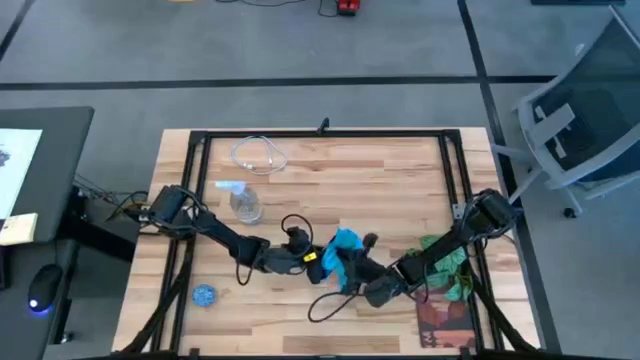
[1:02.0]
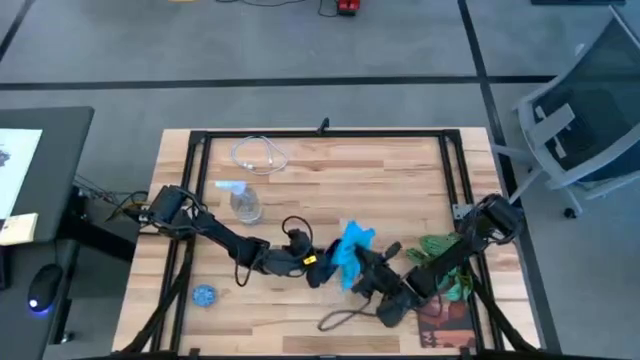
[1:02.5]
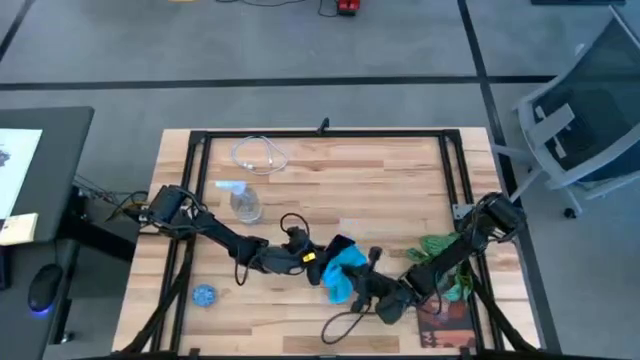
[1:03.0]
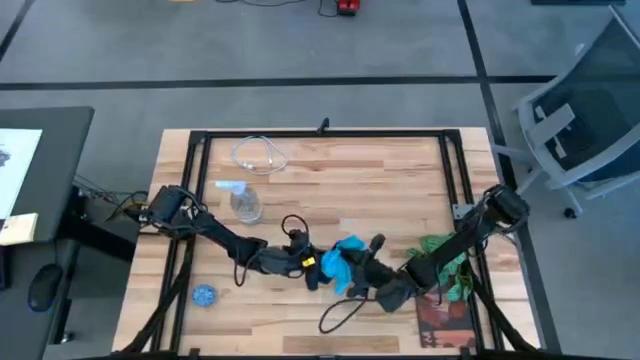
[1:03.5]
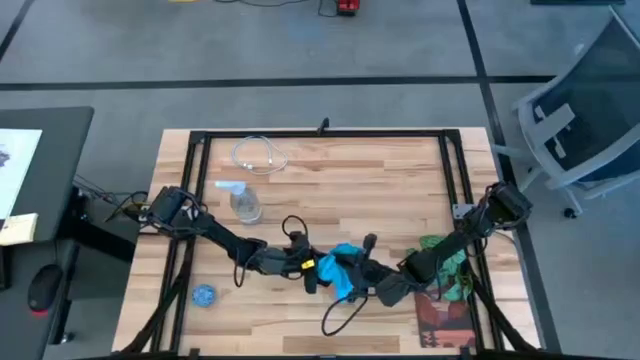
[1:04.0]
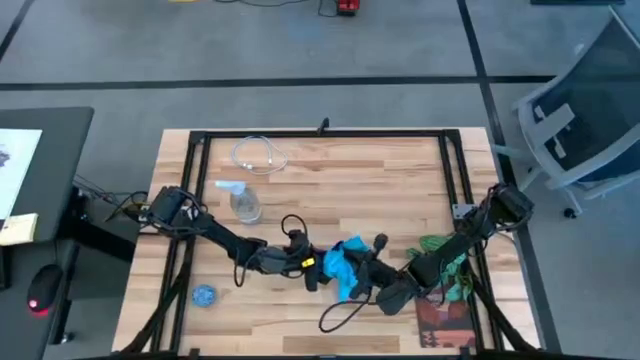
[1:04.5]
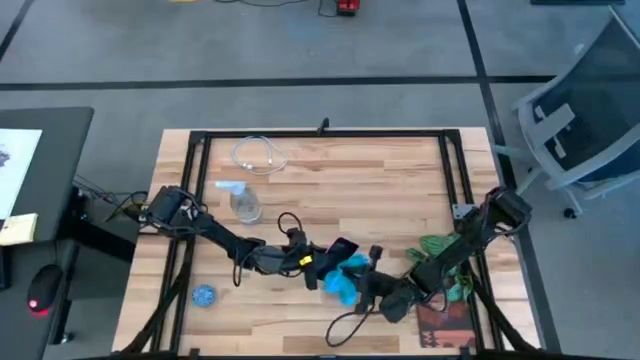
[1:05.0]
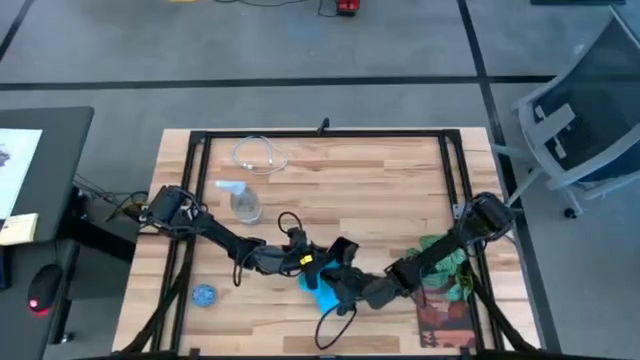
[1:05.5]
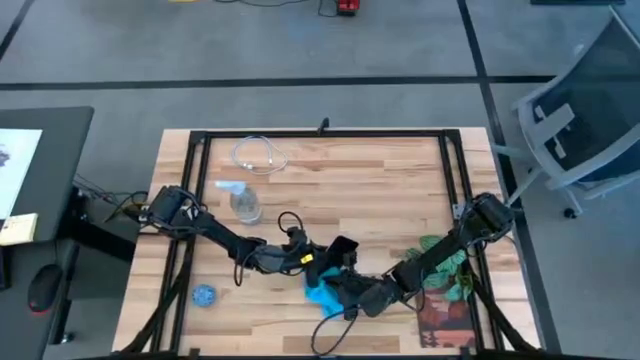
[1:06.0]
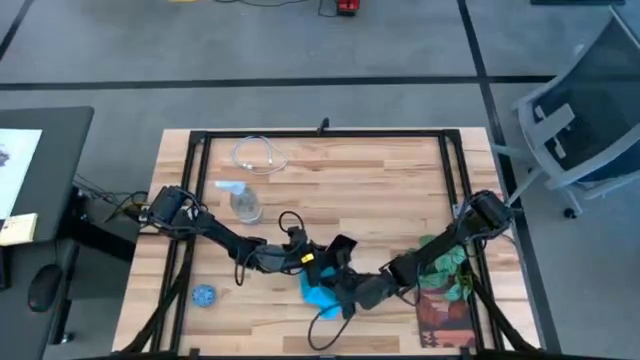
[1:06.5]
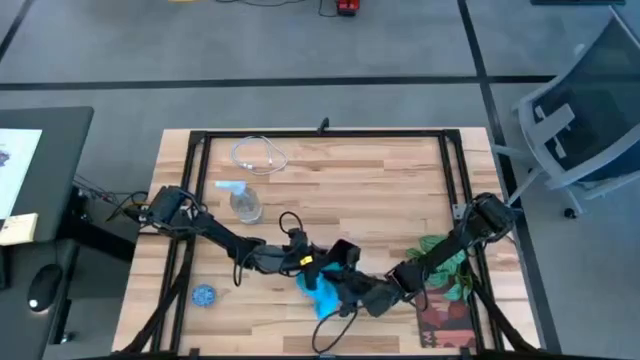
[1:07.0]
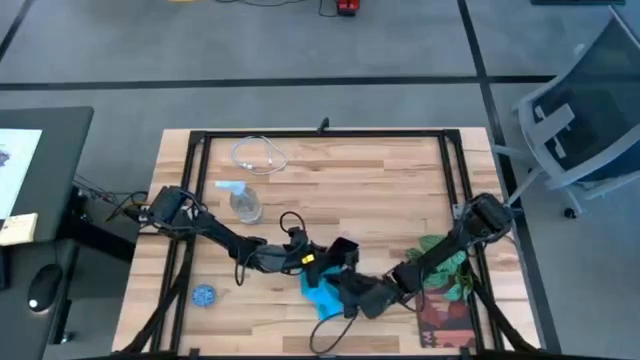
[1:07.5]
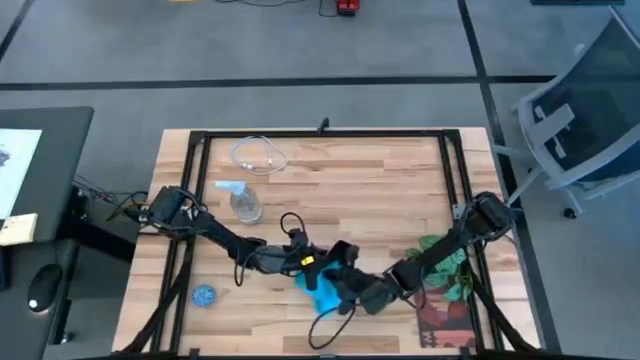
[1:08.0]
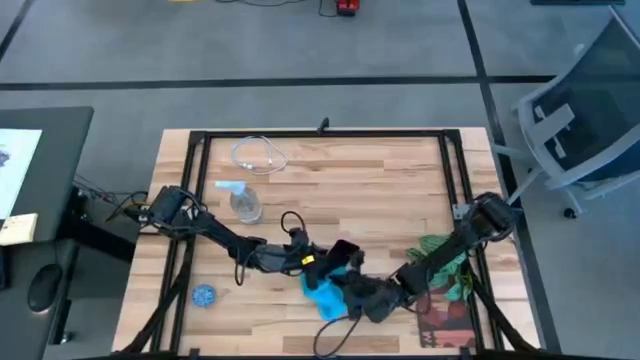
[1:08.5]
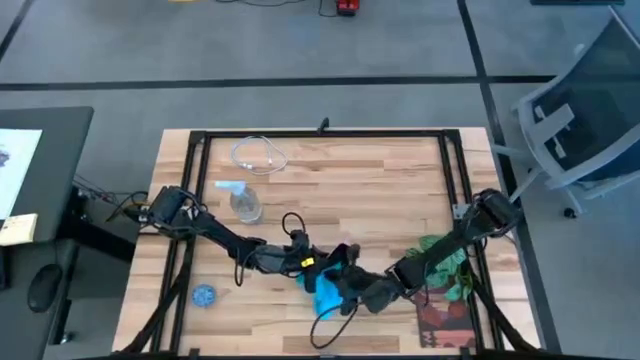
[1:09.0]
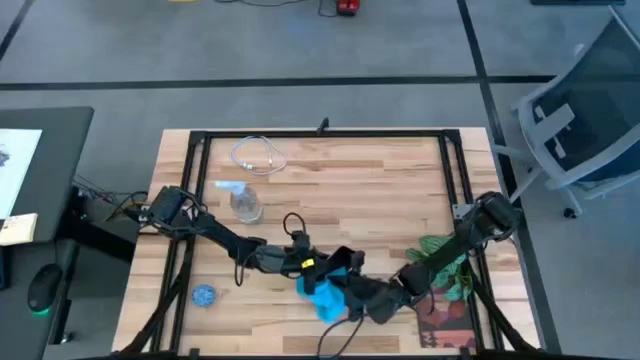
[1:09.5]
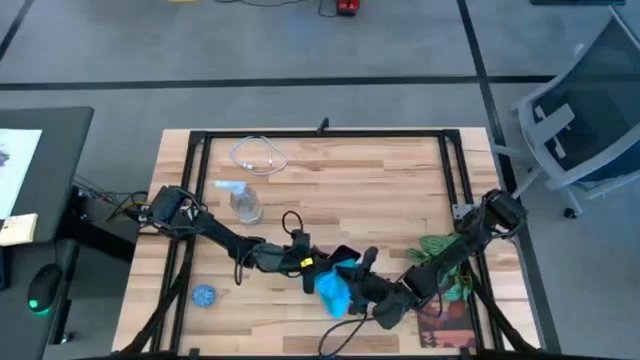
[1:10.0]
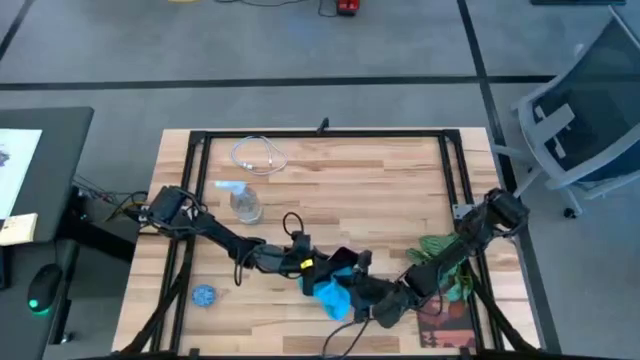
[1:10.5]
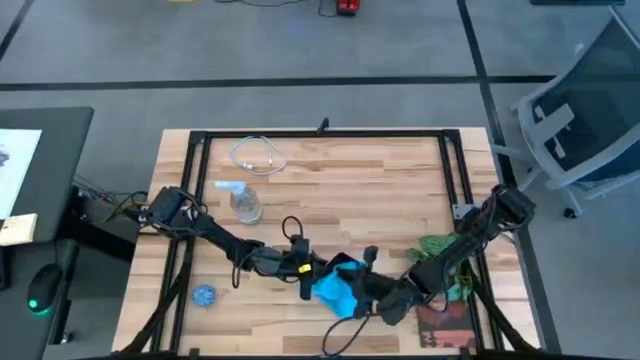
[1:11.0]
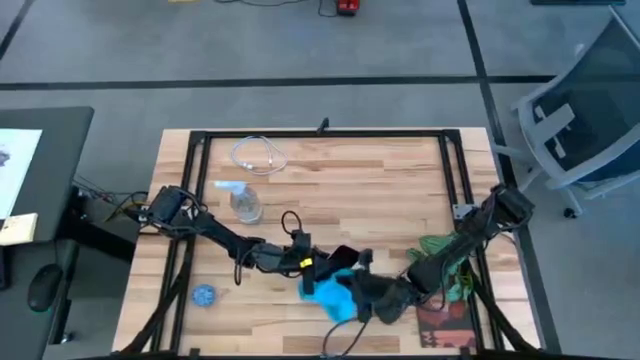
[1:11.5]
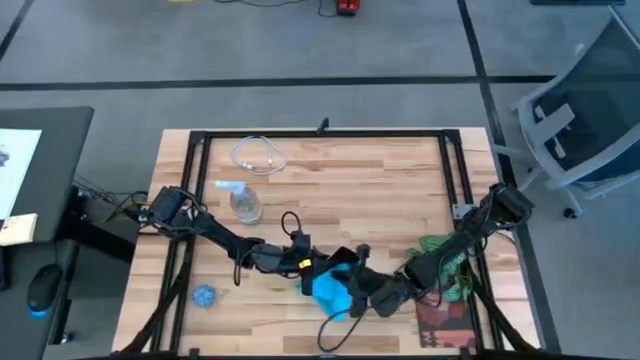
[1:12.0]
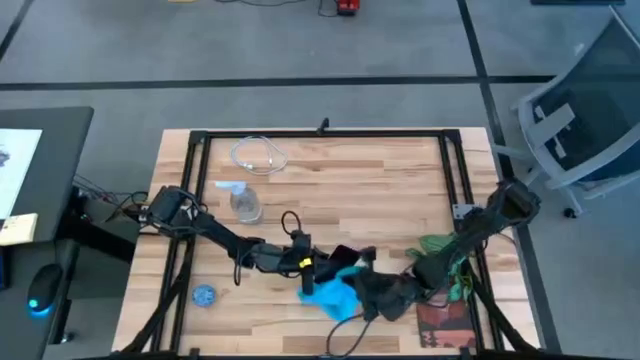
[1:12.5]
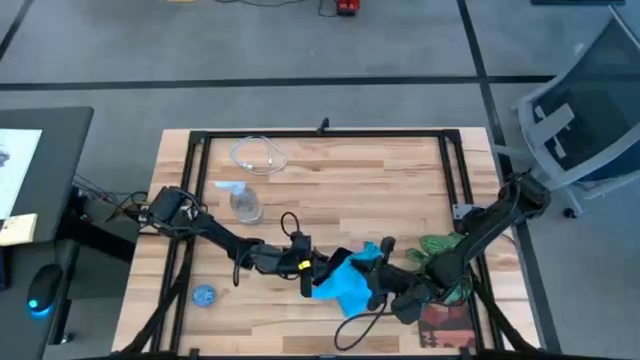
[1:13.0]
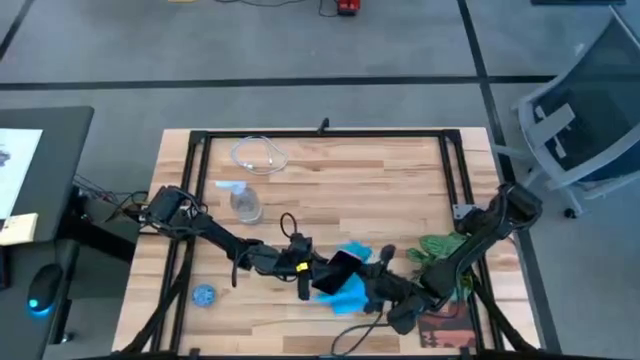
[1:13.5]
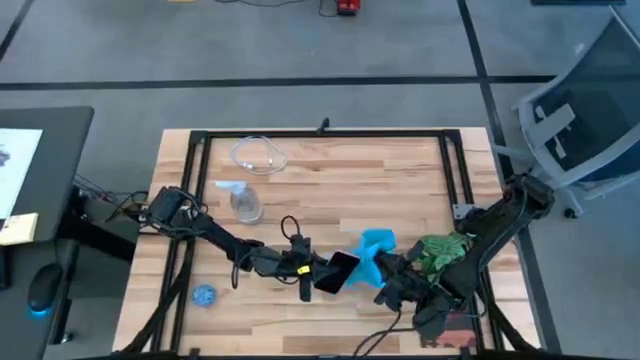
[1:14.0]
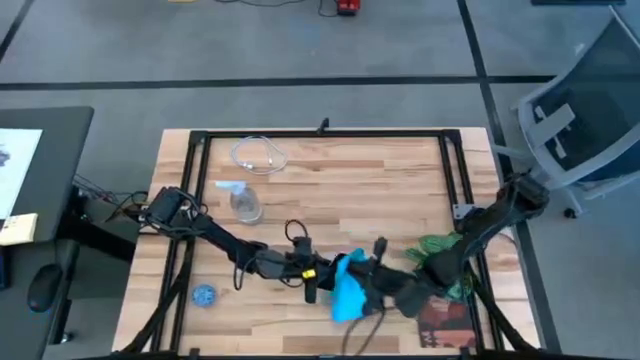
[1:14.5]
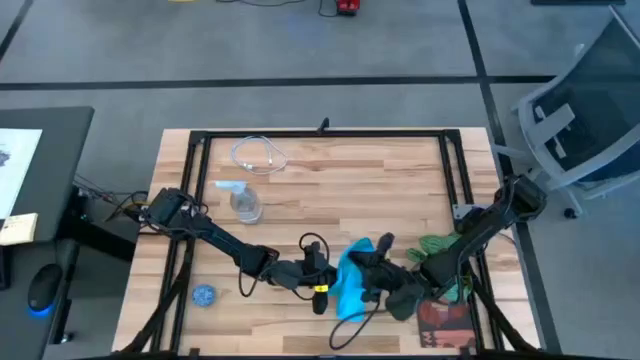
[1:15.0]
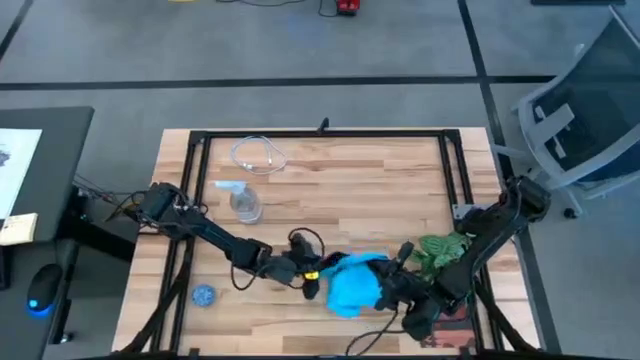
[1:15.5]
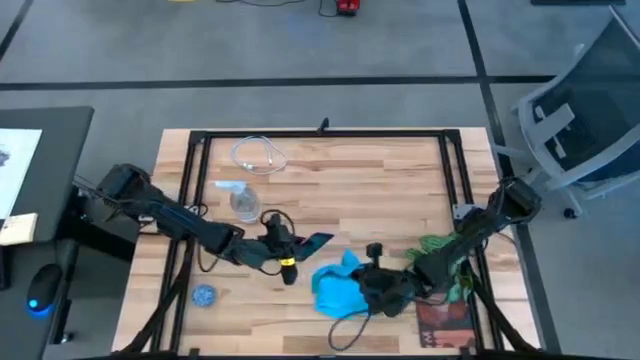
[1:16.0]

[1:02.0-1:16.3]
Task: Apply microfiber cloth
Wipe the front of the cellphone with a microfiber cloth

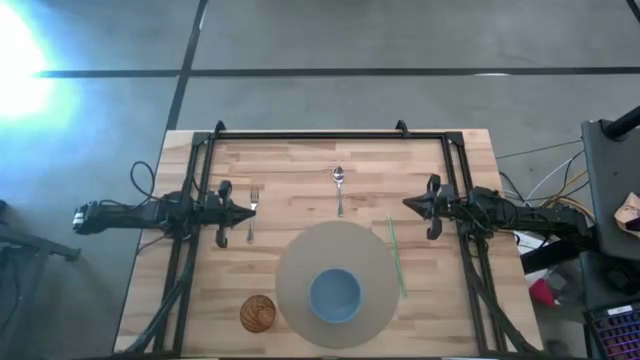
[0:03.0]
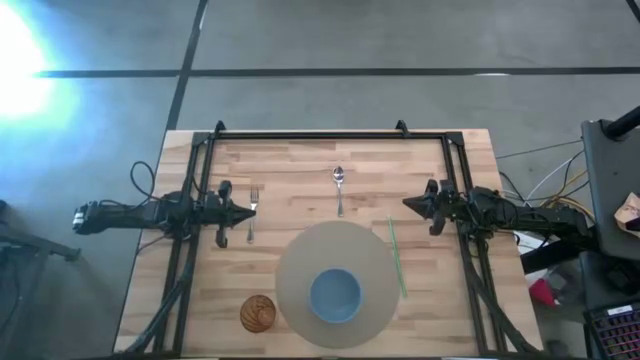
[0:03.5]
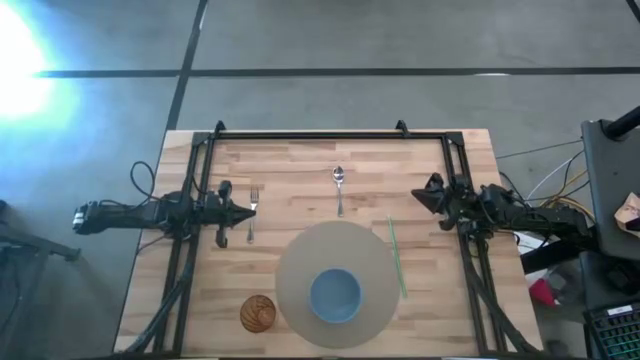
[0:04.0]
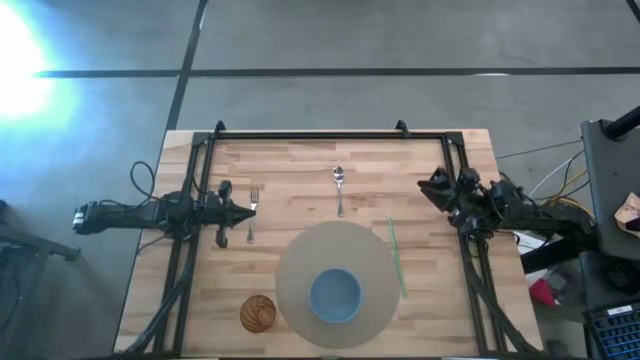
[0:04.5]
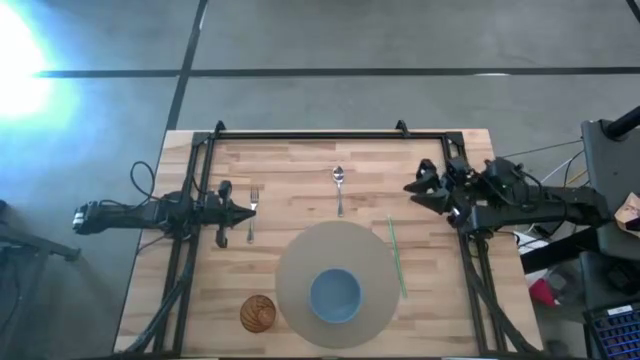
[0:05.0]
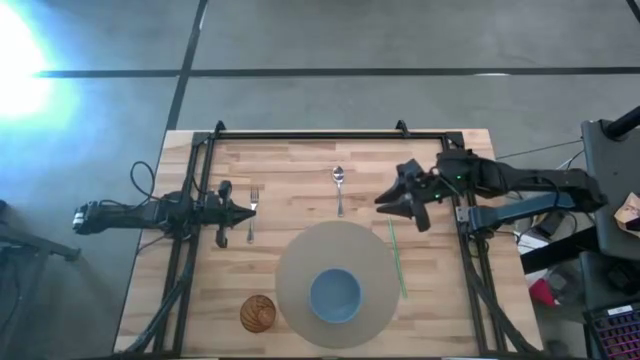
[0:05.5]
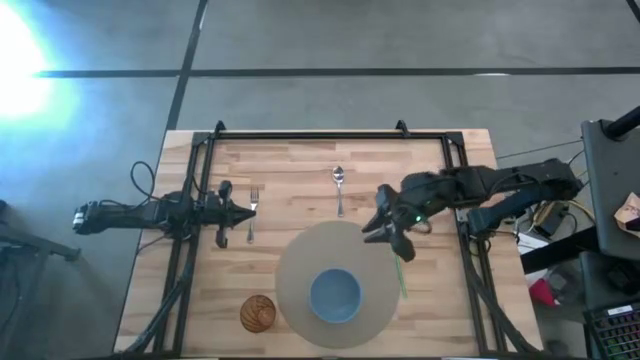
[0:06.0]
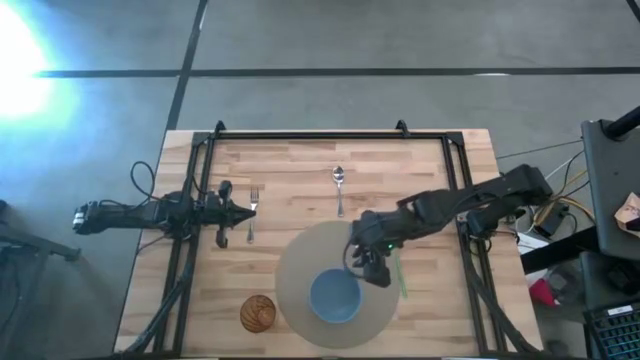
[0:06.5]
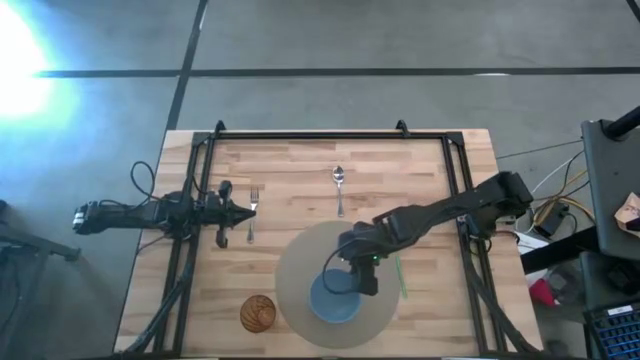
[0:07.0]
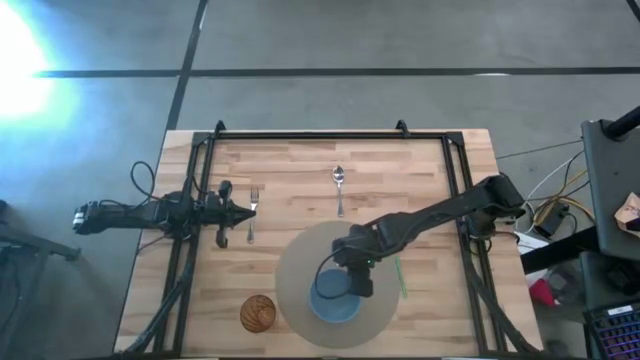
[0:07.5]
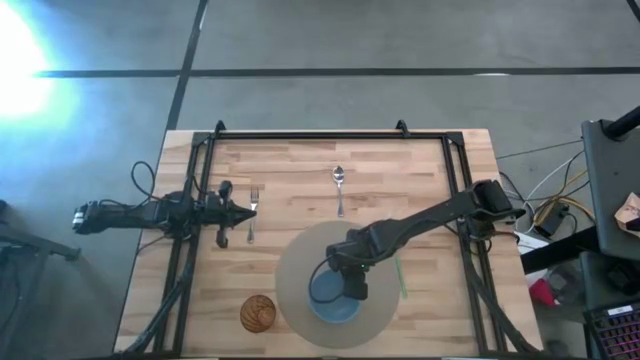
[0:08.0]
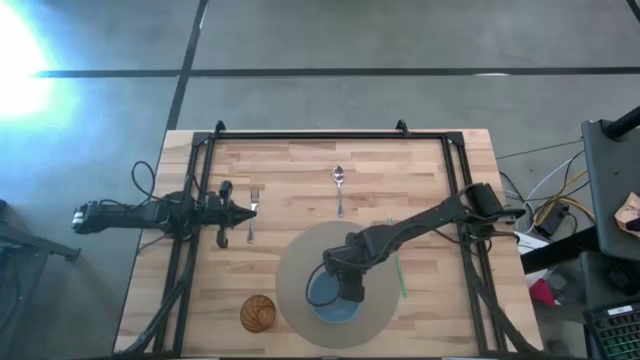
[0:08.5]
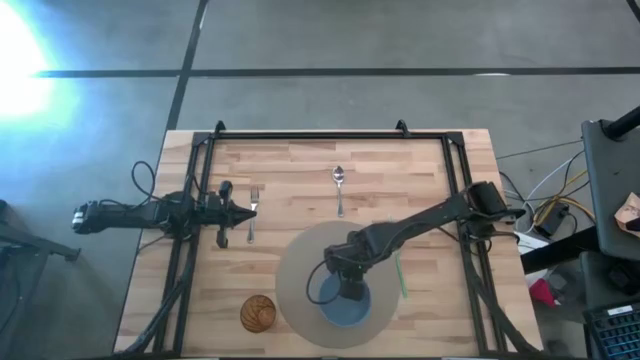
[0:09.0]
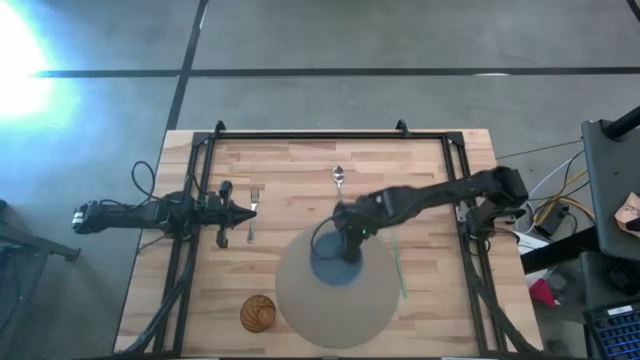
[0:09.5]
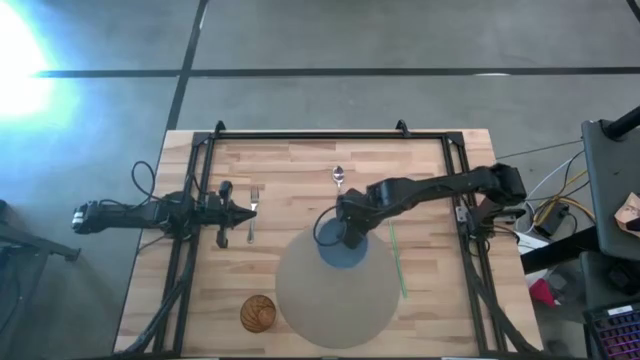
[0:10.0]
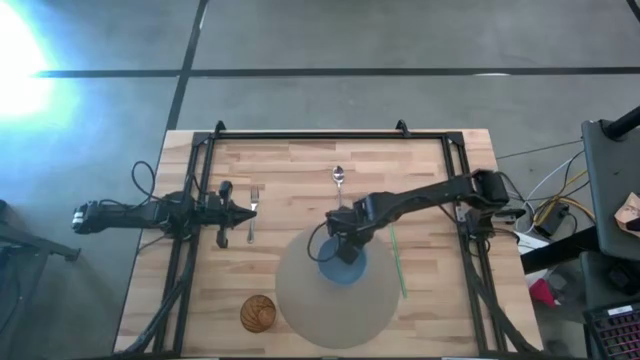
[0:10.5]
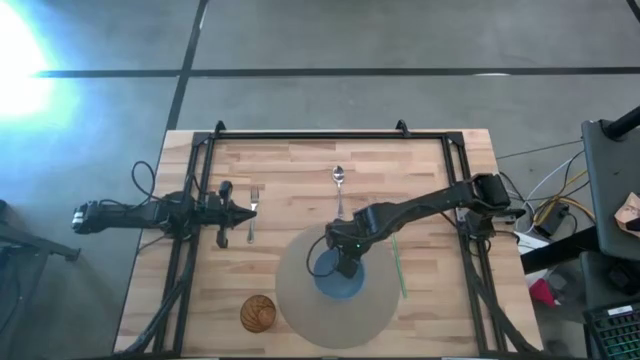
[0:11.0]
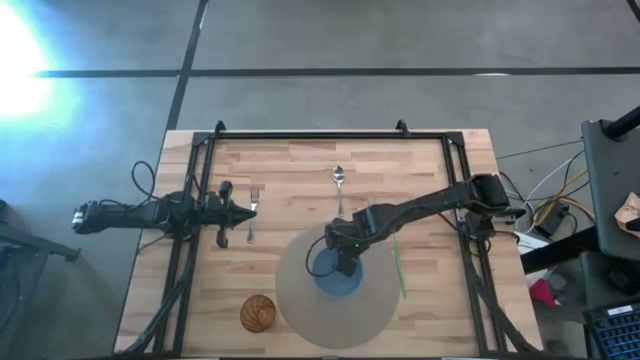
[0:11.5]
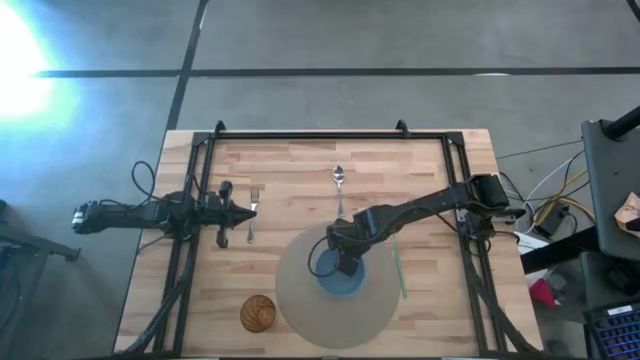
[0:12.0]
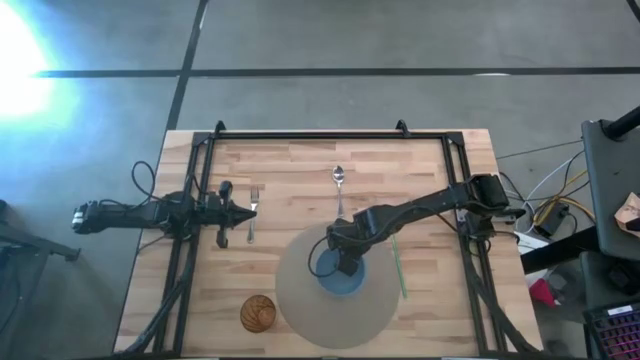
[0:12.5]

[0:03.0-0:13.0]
Task: Pick & Place Utensil
Adjust the blue bowl on the gray table mat
